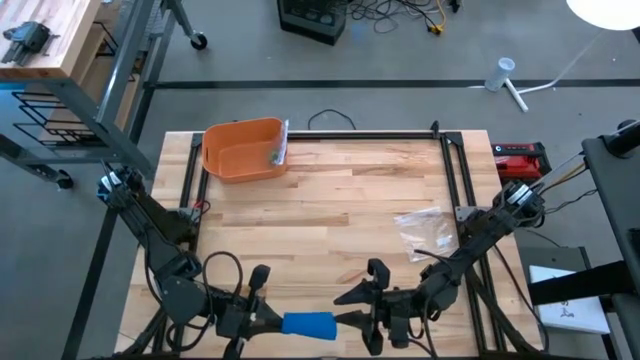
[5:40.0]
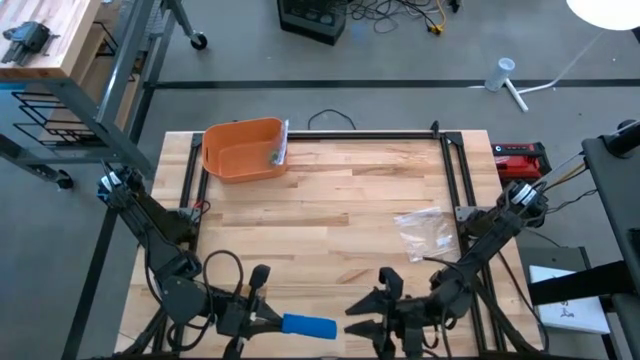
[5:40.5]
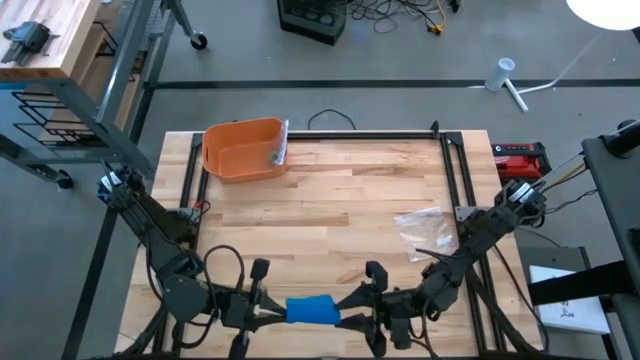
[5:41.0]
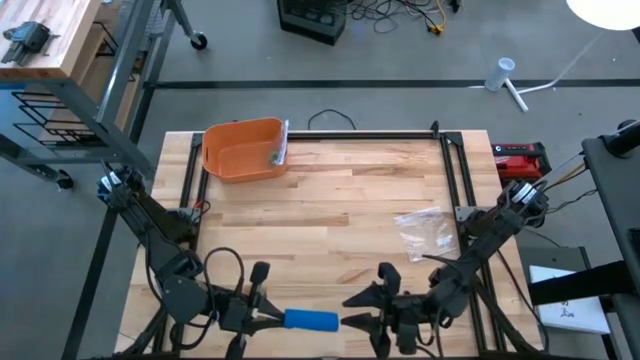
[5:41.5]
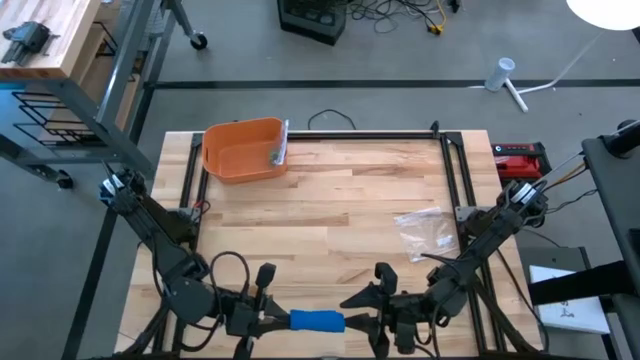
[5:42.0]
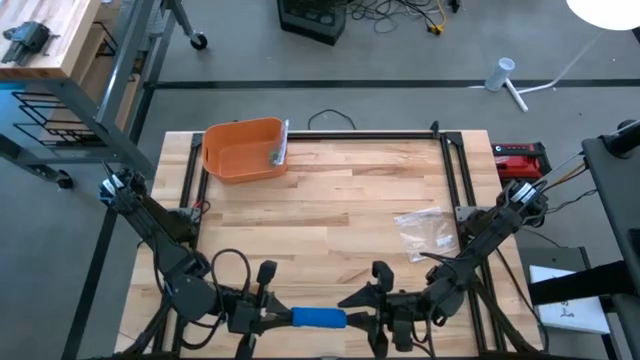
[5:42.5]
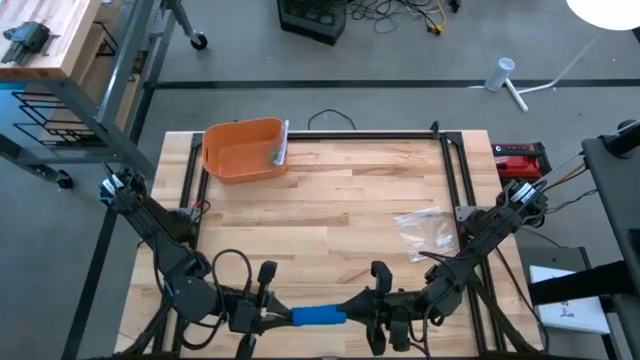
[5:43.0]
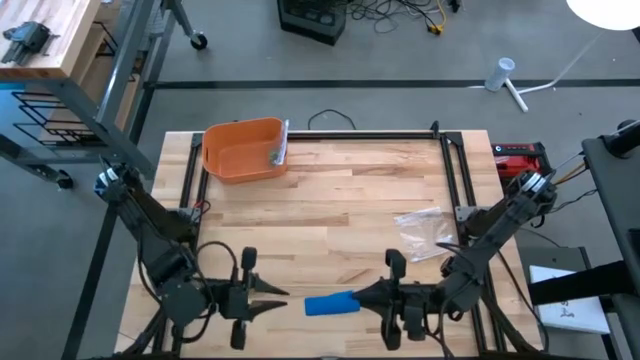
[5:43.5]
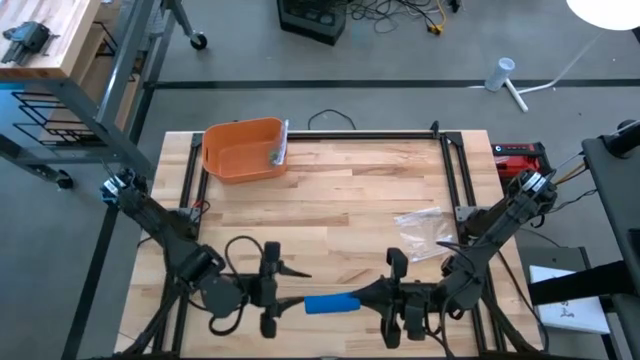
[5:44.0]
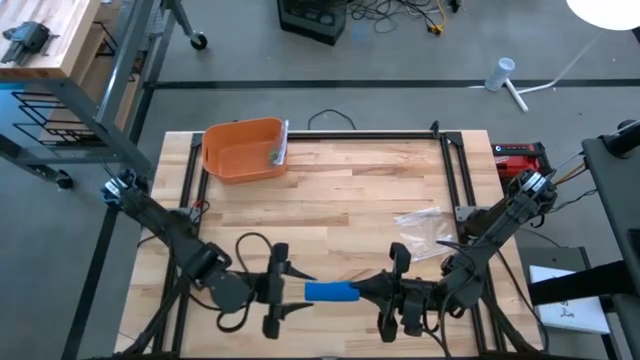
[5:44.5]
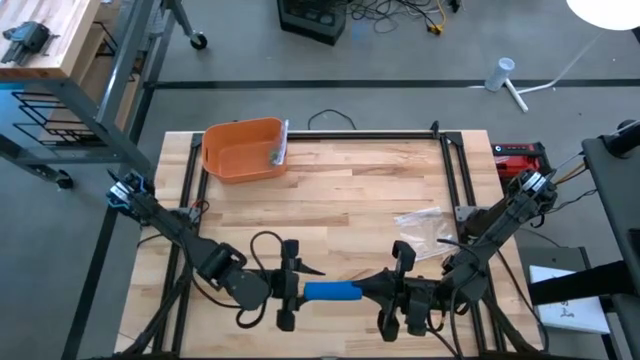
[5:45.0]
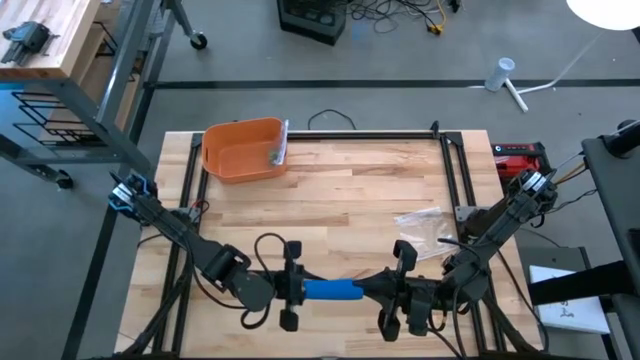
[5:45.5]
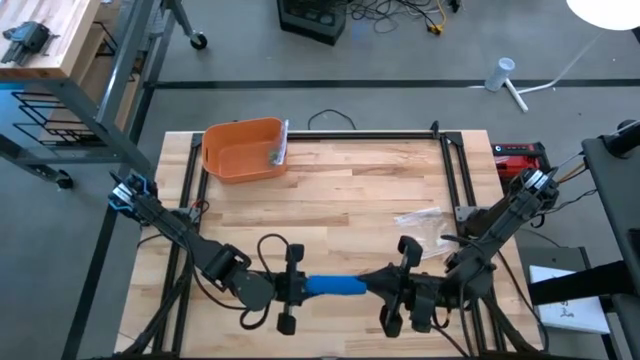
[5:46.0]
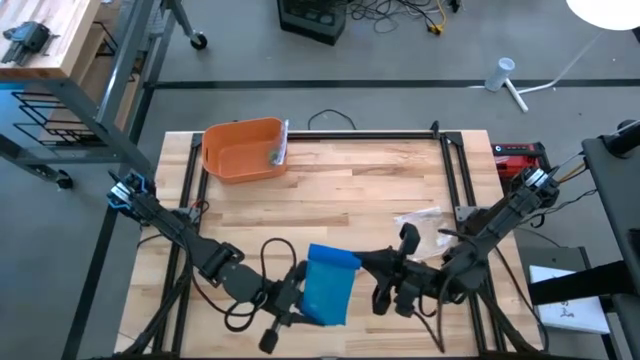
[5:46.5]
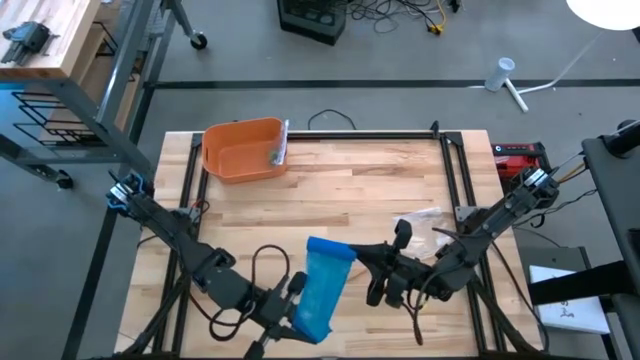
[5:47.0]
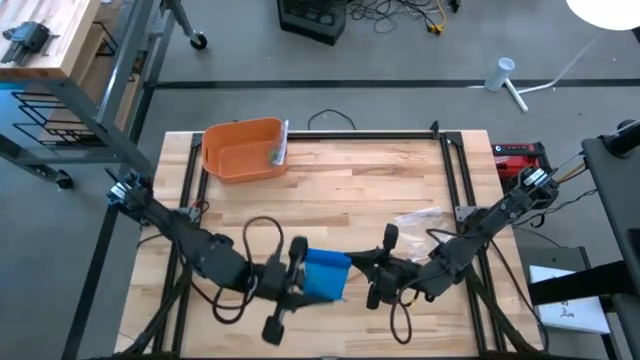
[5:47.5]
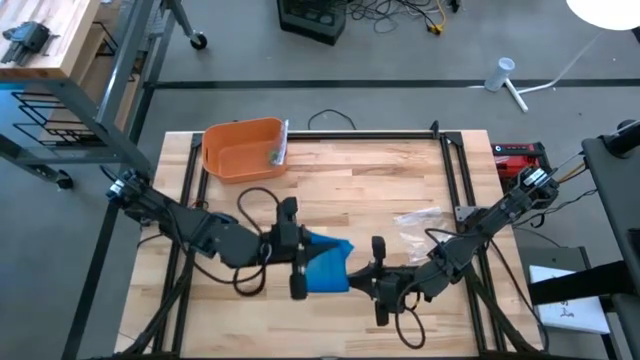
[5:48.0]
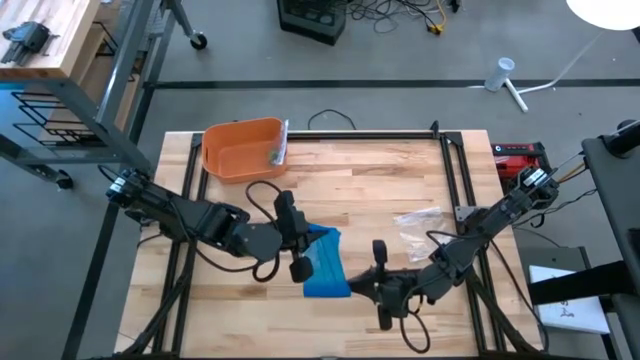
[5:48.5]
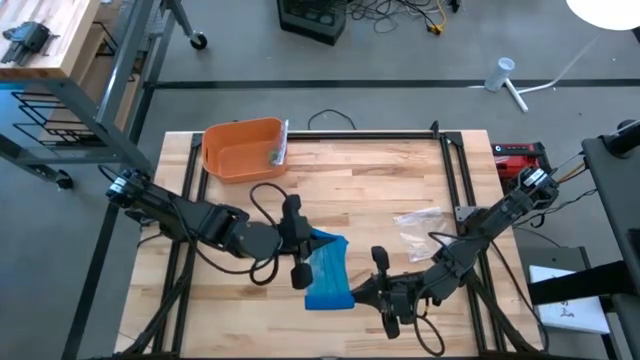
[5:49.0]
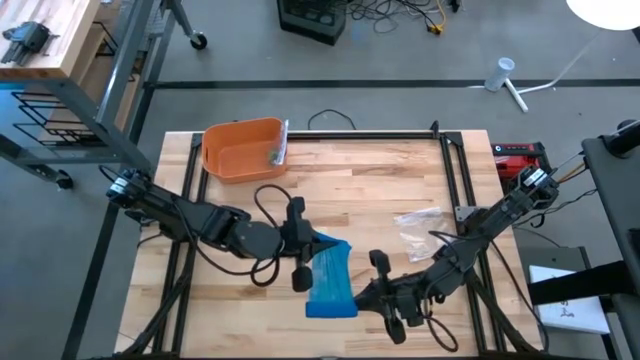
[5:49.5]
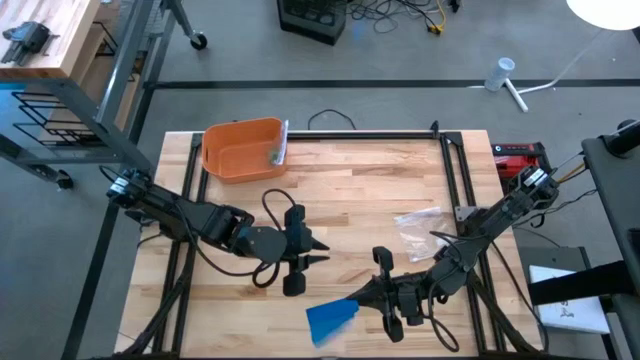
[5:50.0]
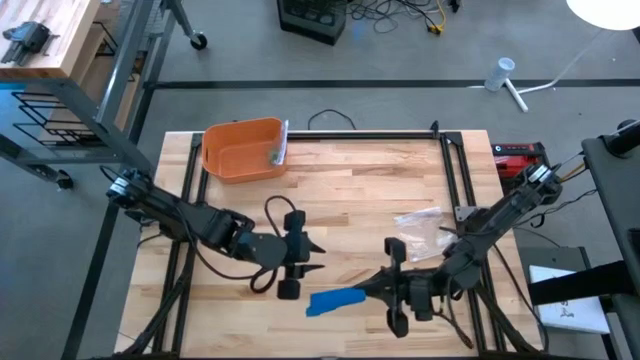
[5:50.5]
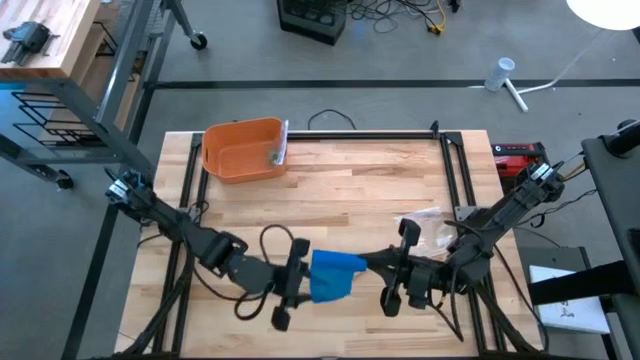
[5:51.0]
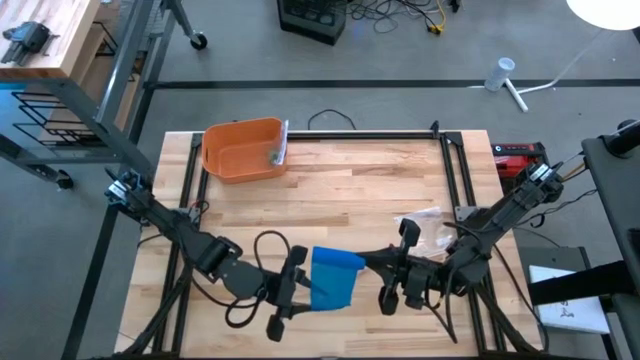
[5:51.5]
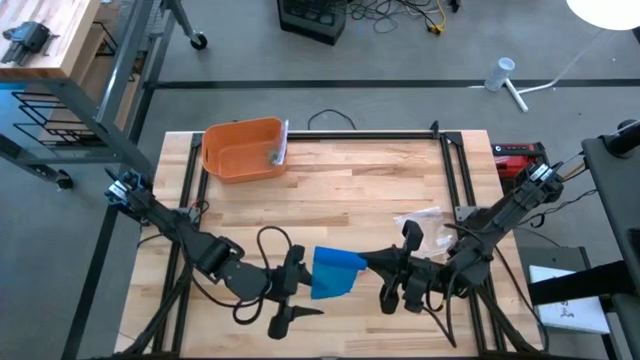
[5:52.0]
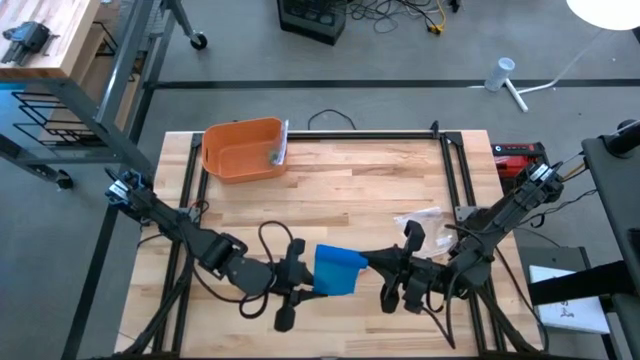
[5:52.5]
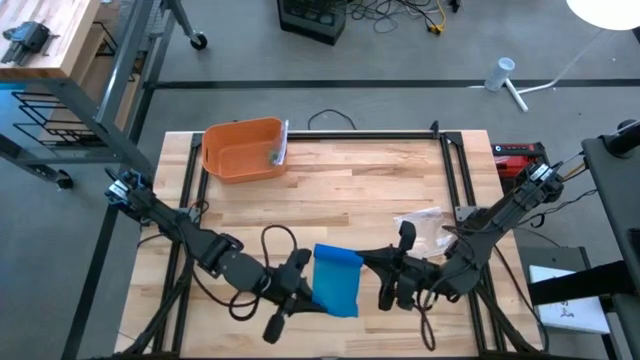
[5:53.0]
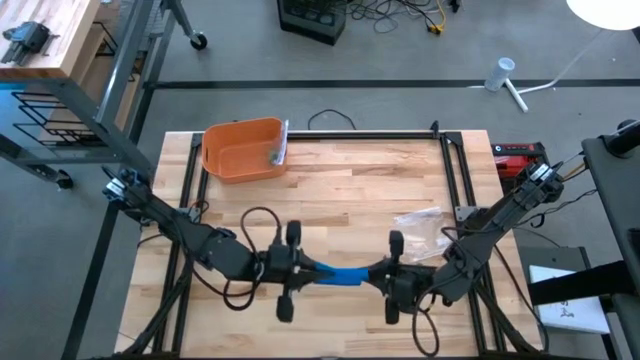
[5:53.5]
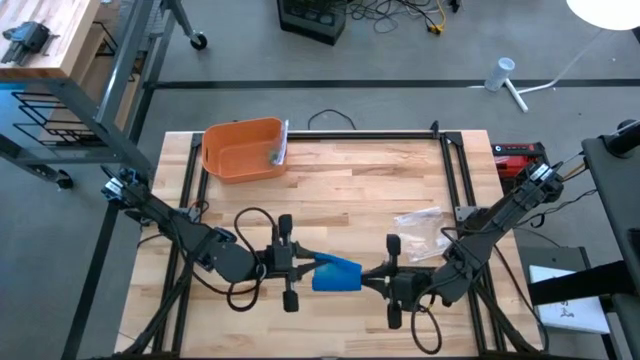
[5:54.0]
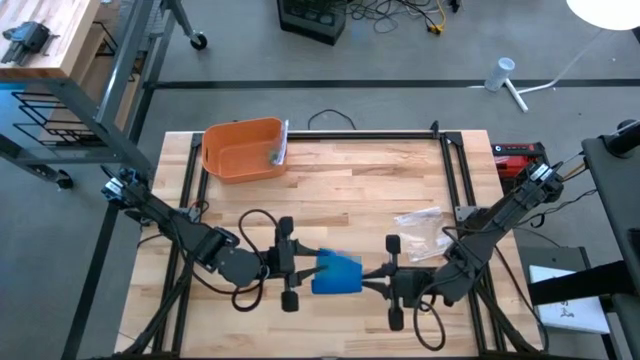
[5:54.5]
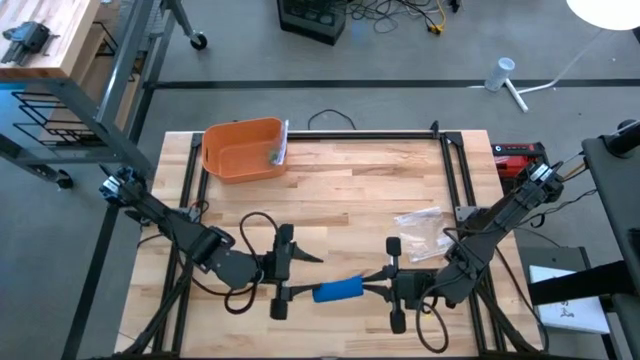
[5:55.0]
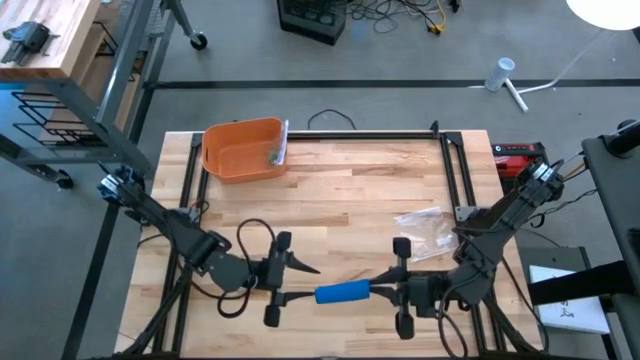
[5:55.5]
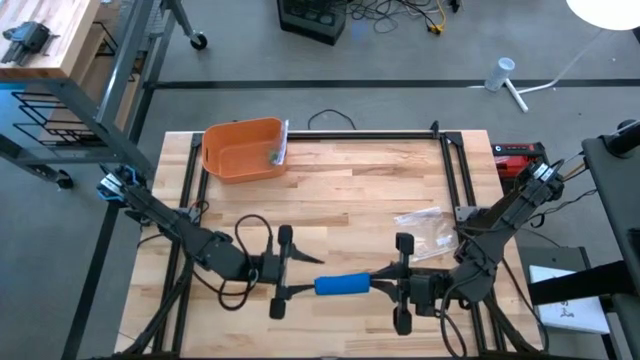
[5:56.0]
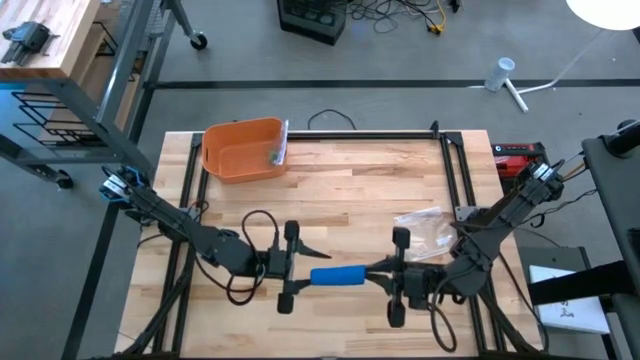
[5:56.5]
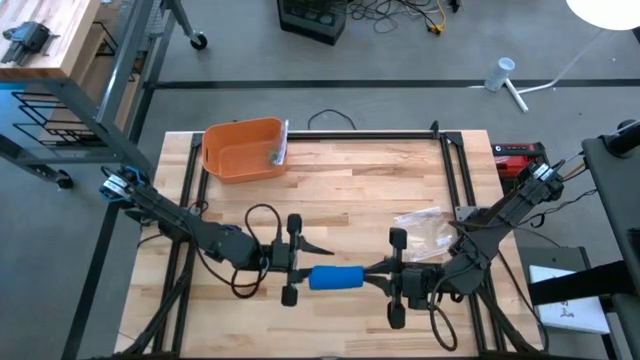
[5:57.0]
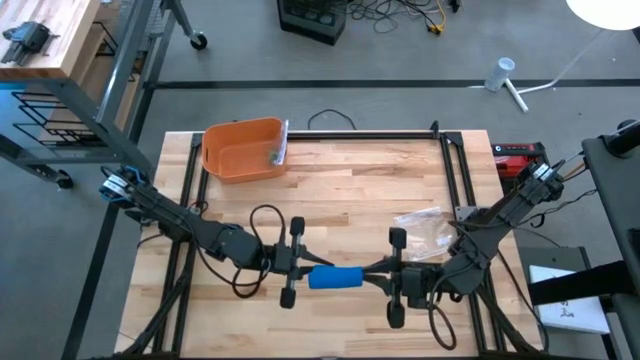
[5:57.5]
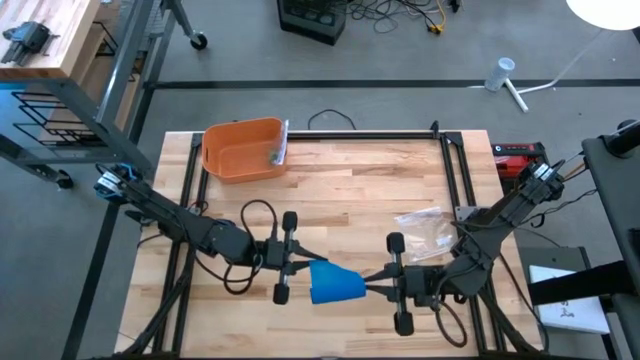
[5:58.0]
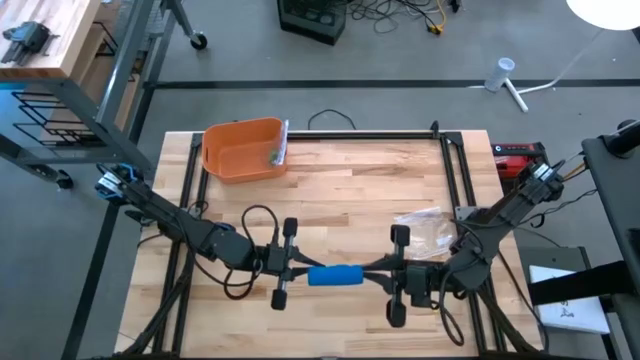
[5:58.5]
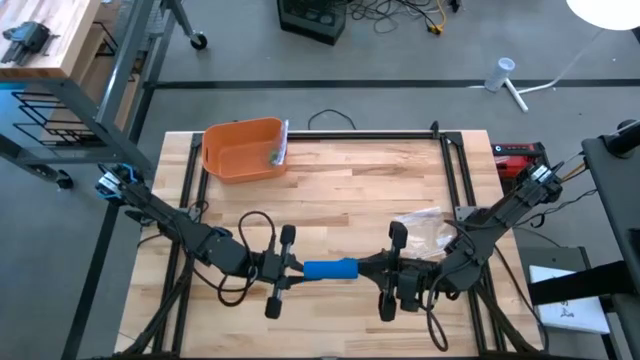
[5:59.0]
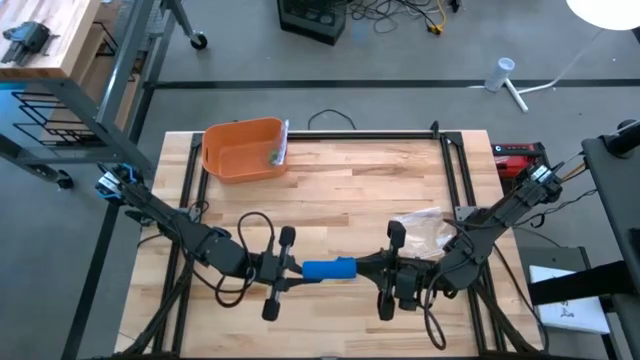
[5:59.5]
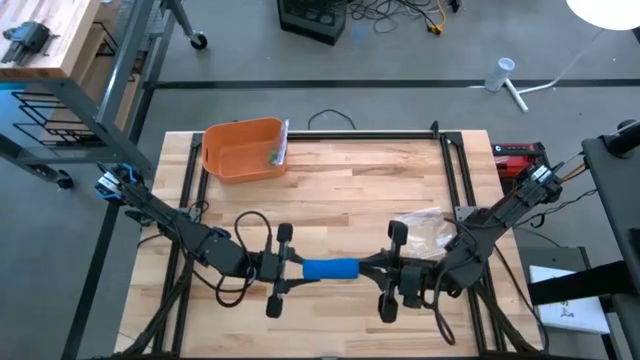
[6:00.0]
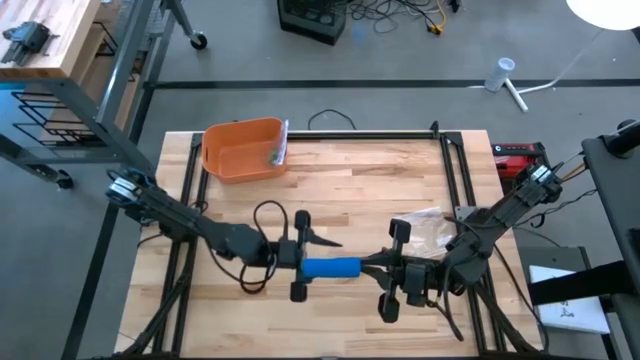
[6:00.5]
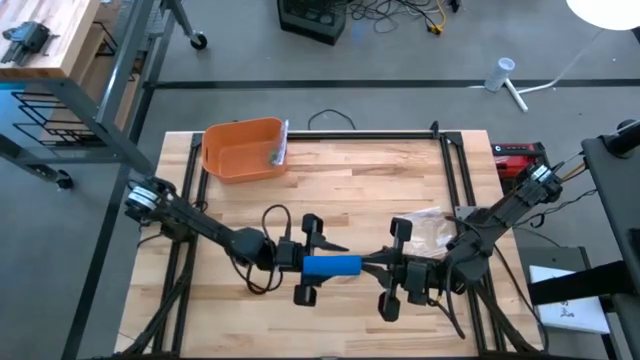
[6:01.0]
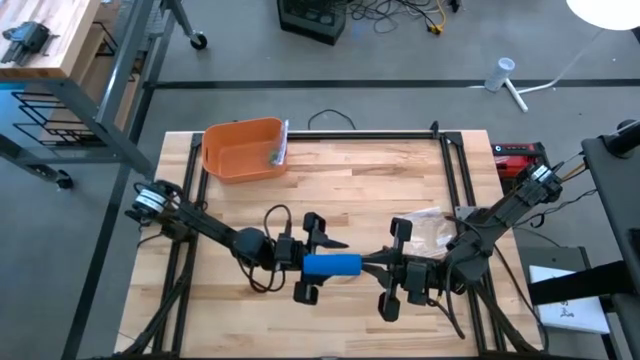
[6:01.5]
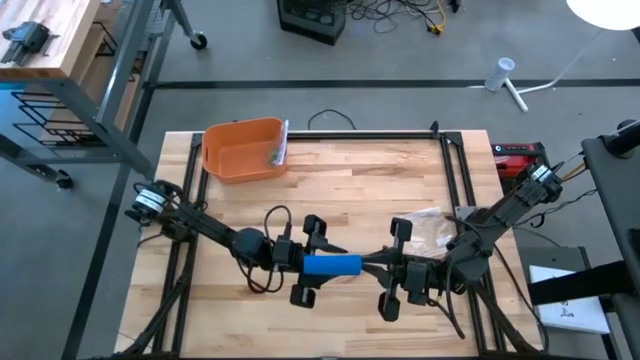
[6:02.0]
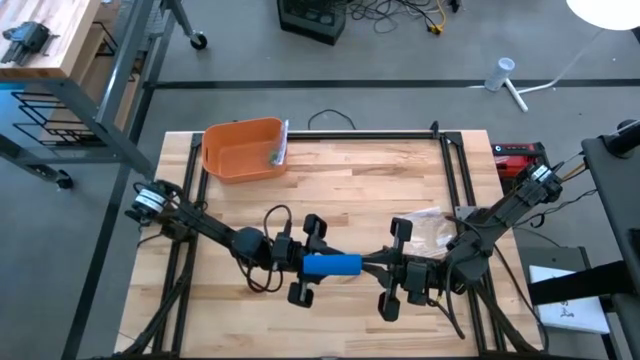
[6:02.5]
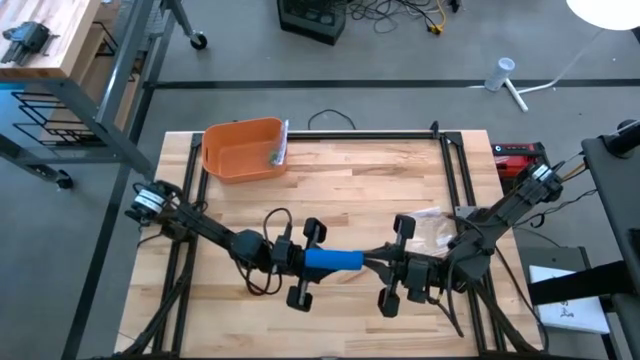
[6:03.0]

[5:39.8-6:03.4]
Task: Roll bandage
Roll the blue bandage
